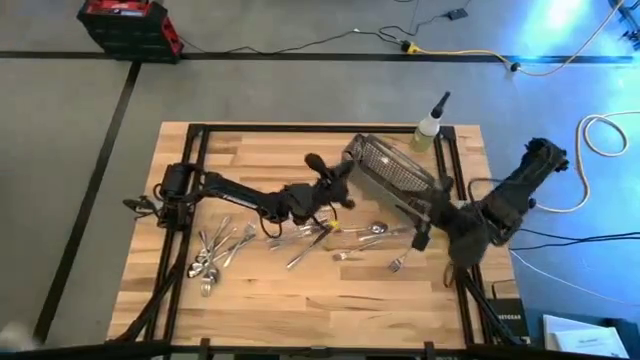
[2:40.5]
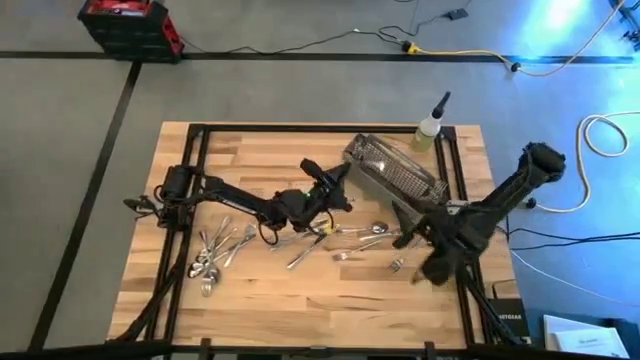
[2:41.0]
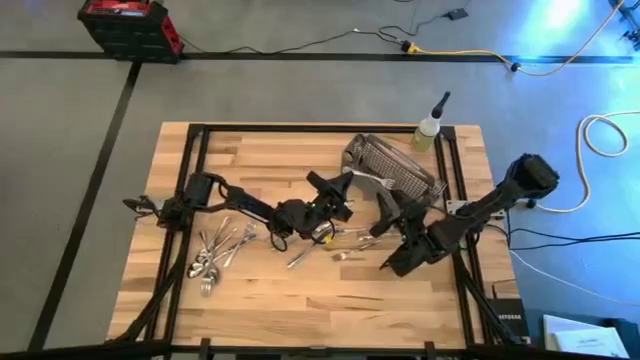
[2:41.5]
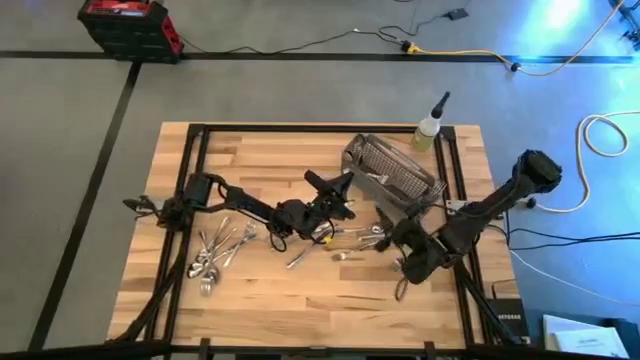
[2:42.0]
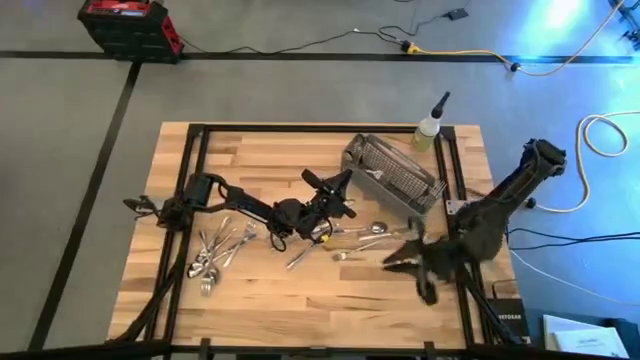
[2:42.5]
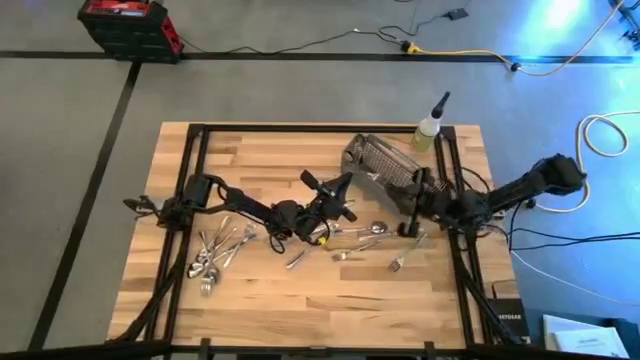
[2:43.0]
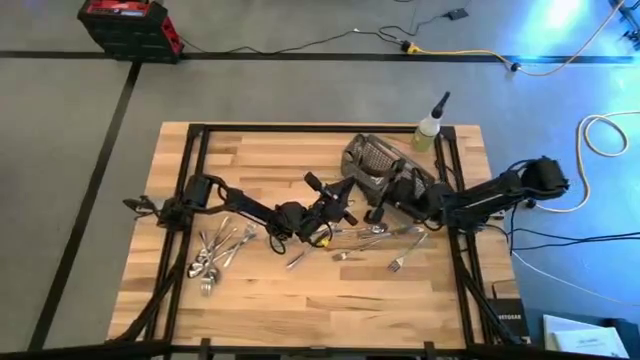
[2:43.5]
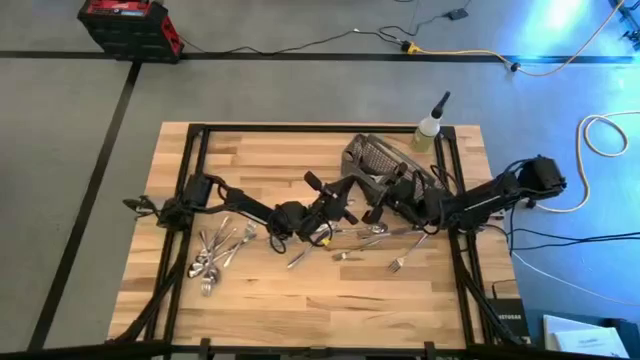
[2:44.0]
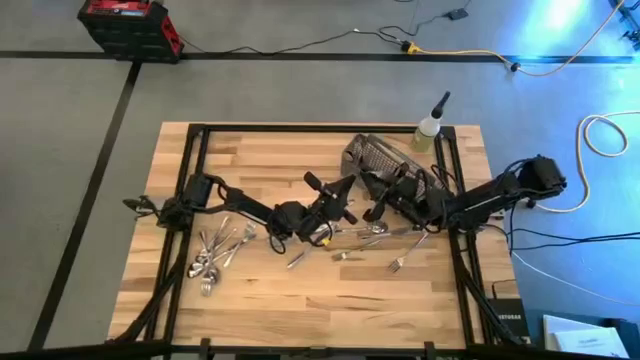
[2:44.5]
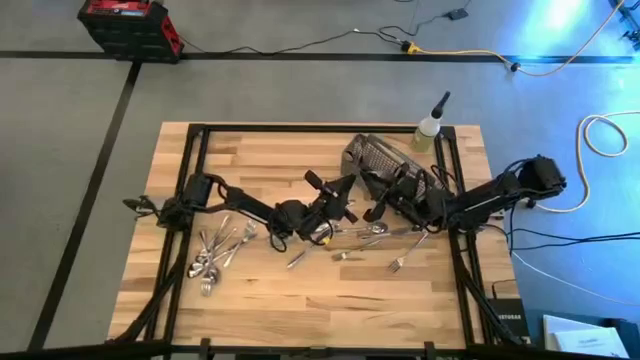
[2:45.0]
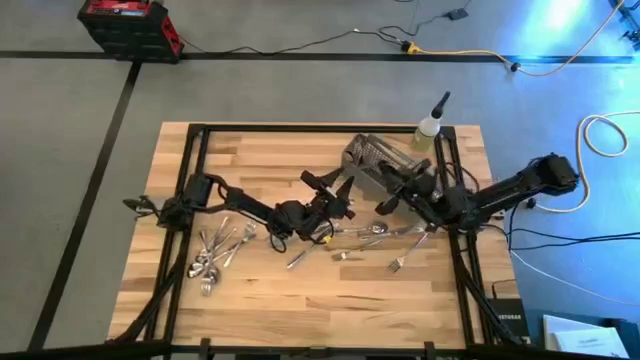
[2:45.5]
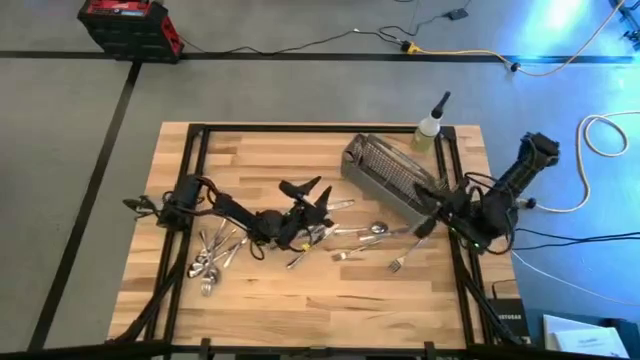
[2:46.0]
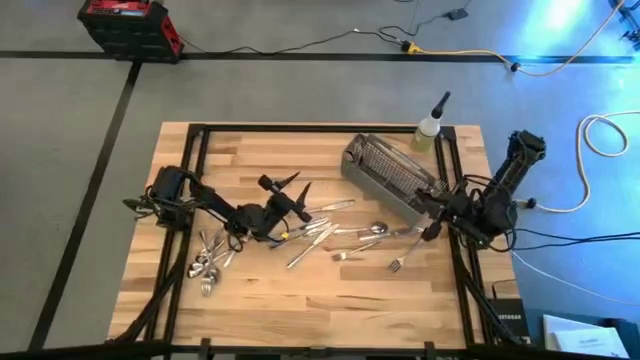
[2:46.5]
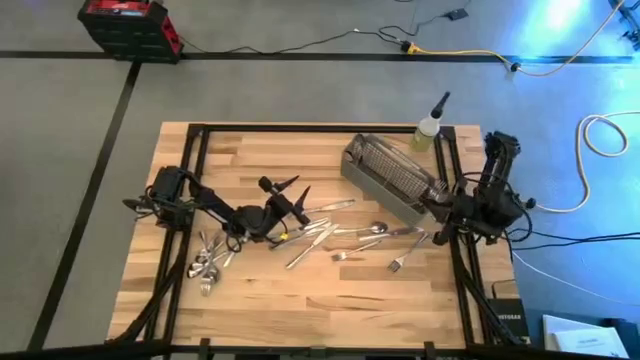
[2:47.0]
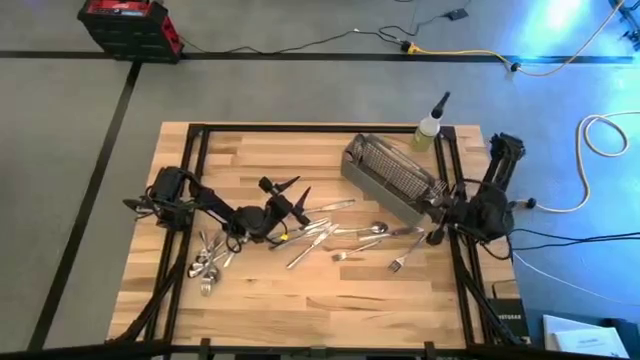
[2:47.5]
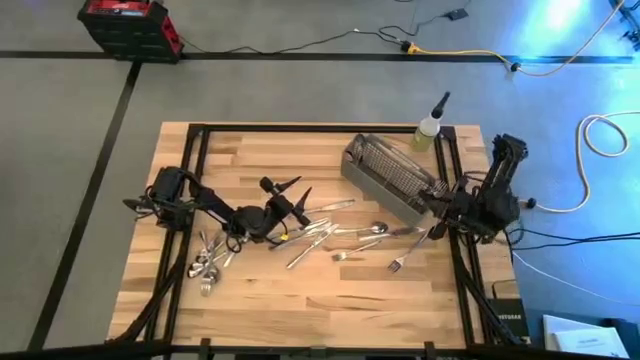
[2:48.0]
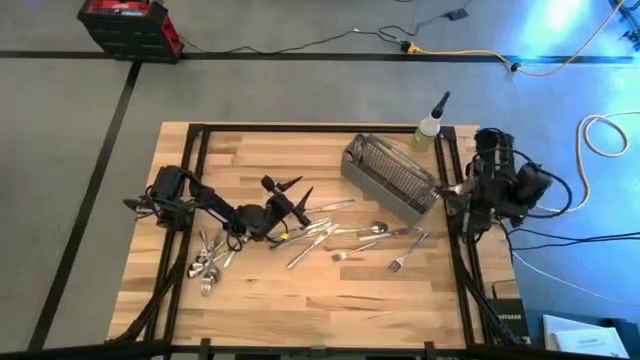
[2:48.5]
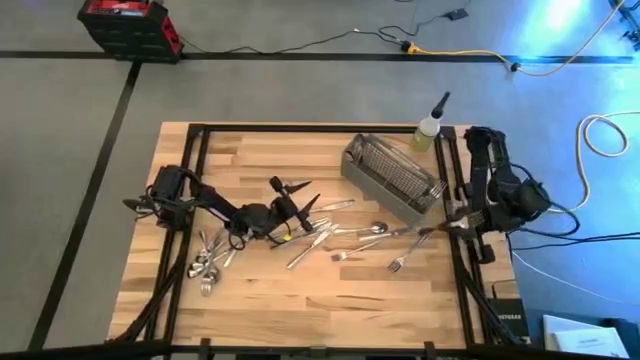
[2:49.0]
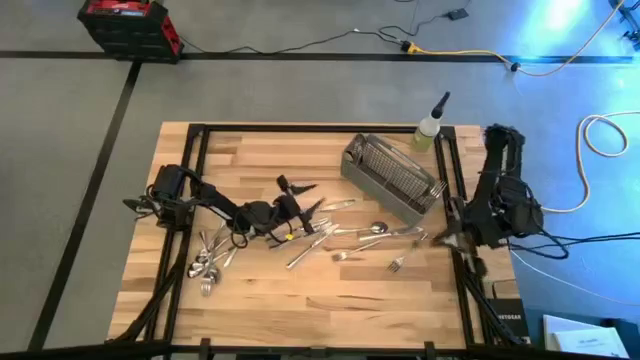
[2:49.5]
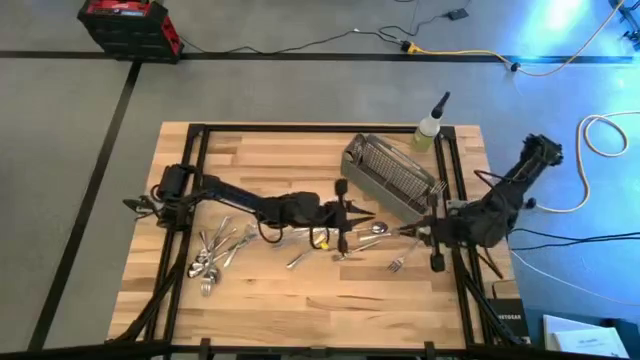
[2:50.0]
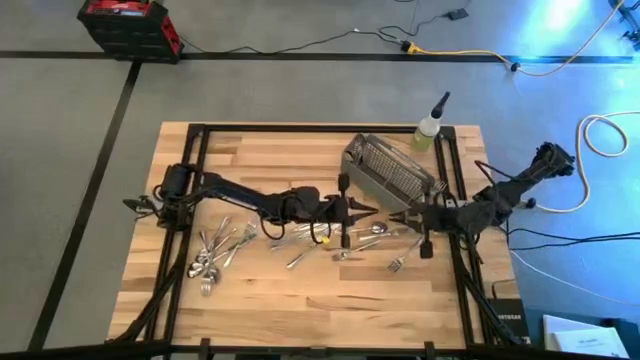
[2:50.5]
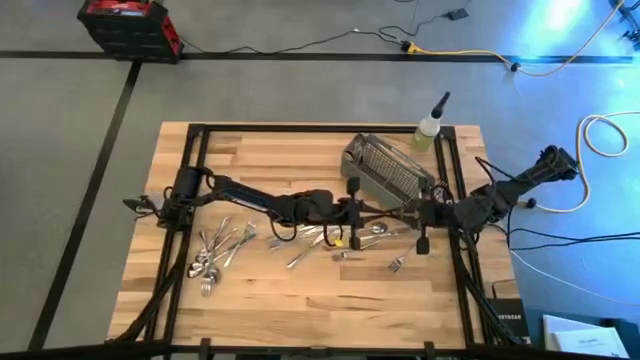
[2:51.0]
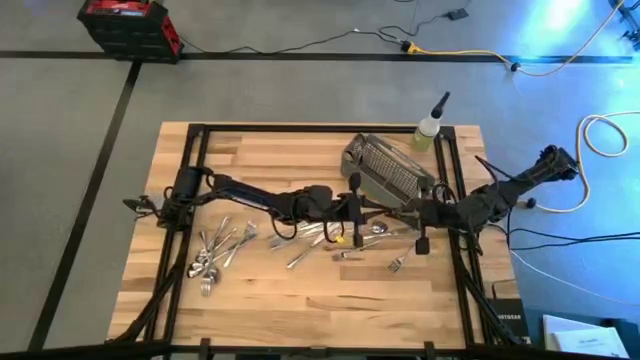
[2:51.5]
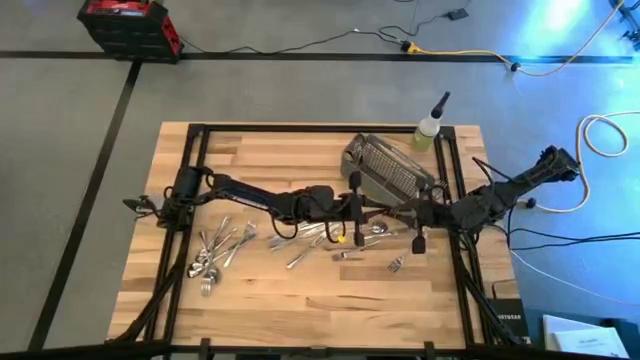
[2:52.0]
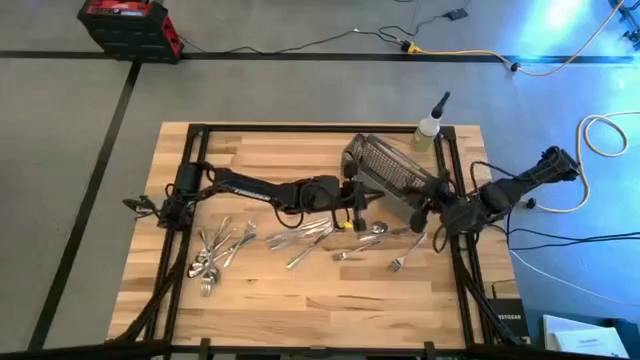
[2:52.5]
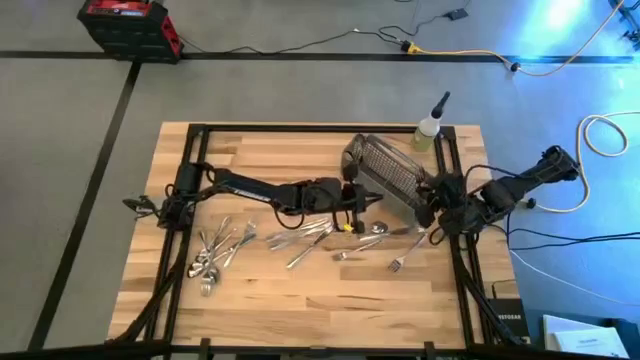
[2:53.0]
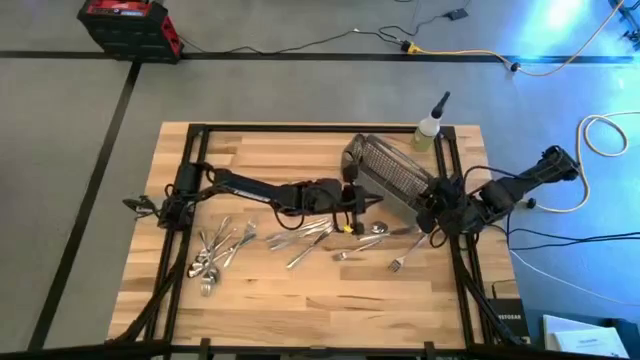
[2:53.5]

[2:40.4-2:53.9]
Task: Sort silverware
Put the silver fork into the gray silverware organizer

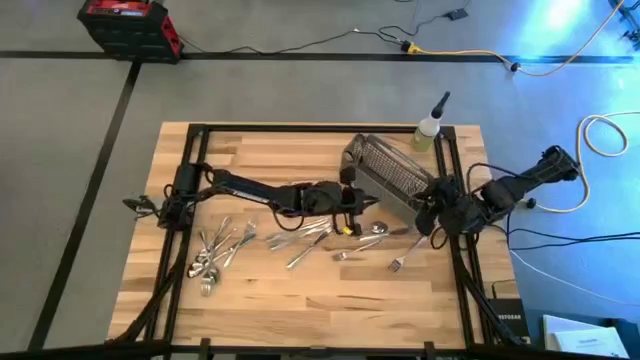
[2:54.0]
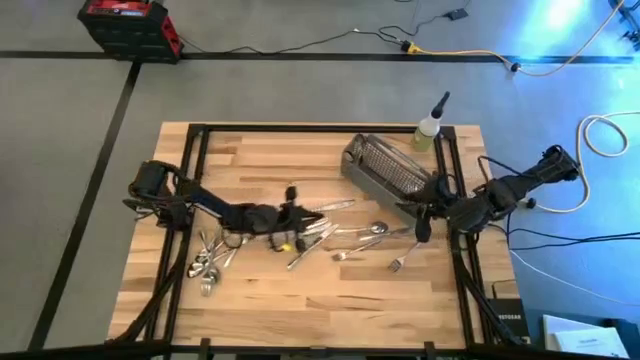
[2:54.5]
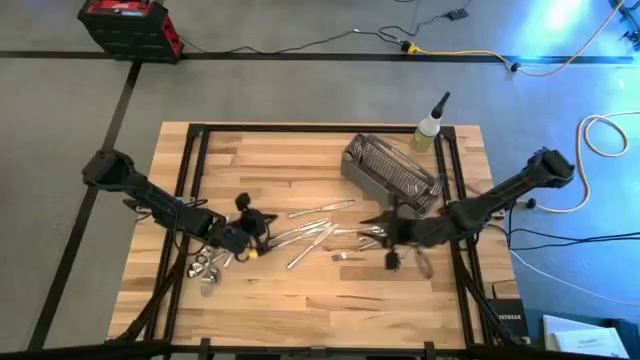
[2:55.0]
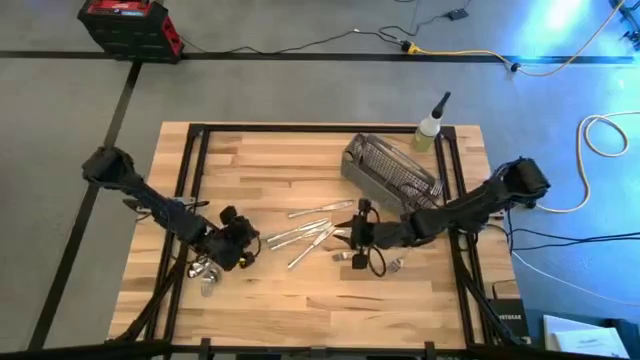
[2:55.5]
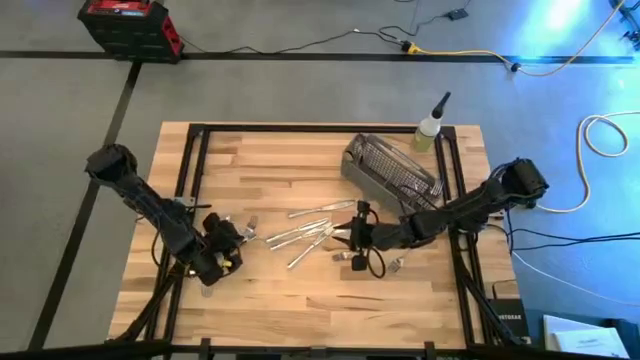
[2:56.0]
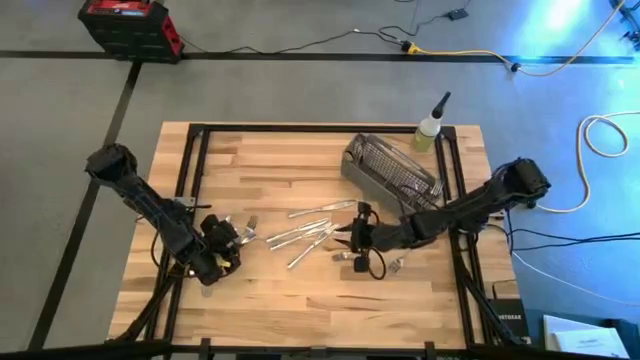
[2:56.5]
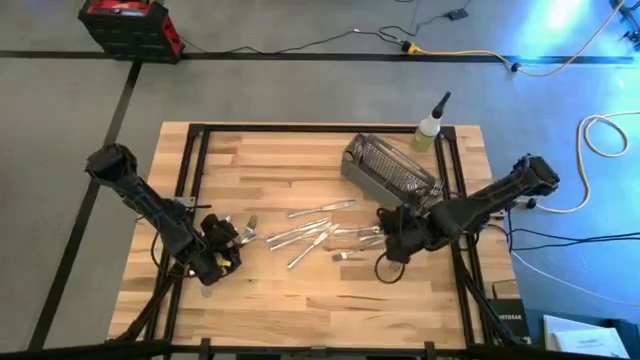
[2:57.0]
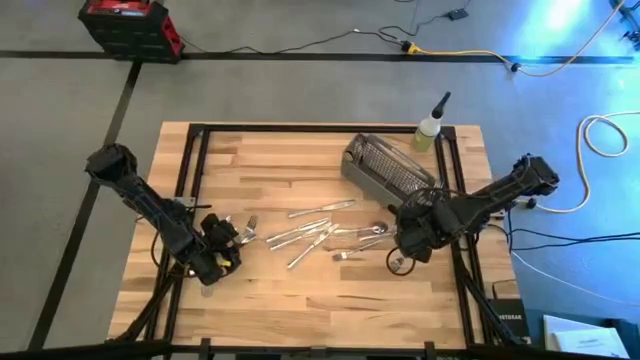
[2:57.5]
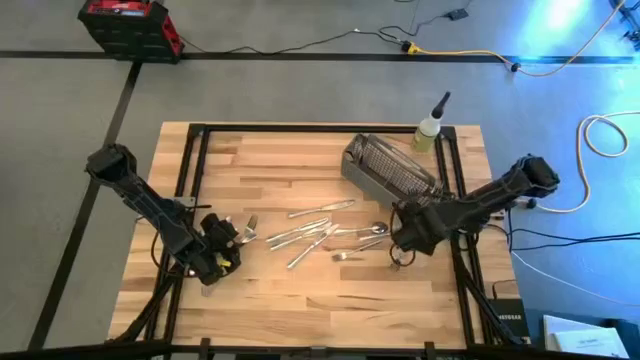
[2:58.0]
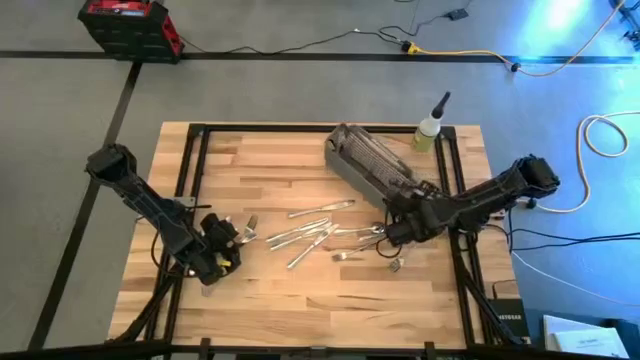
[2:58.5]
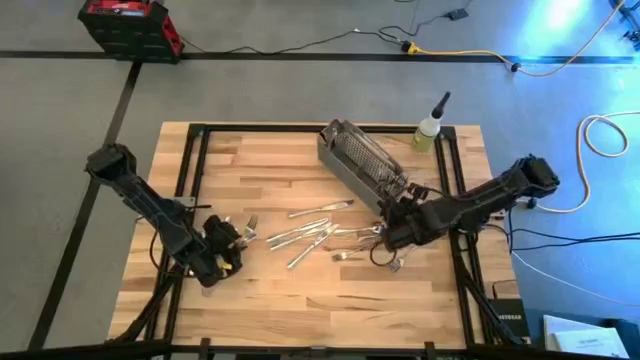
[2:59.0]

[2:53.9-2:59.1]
Adjust the gray silverware organizer

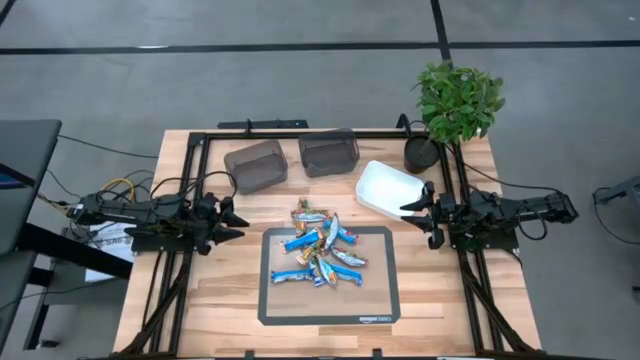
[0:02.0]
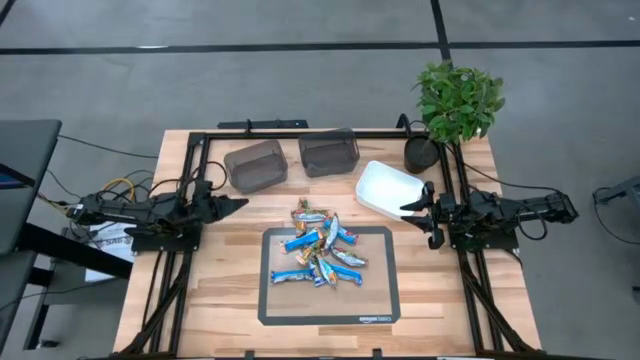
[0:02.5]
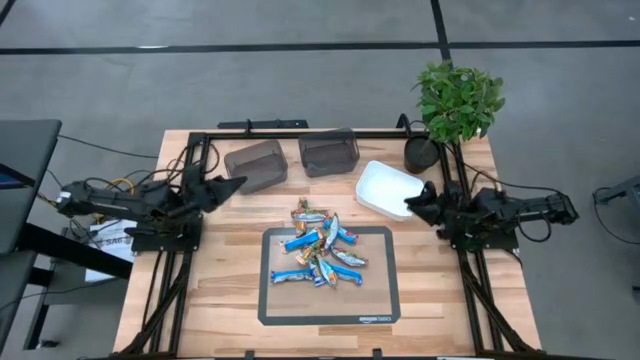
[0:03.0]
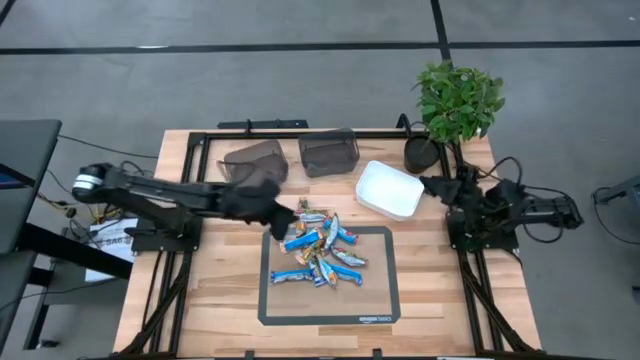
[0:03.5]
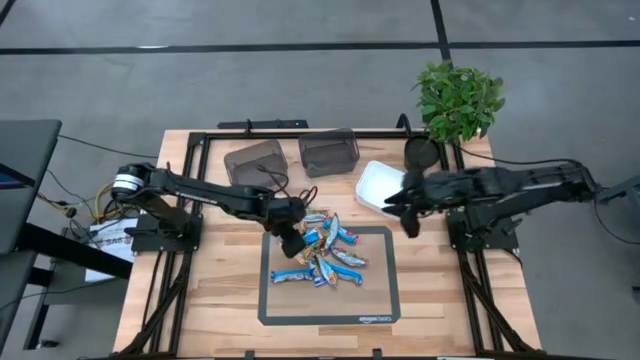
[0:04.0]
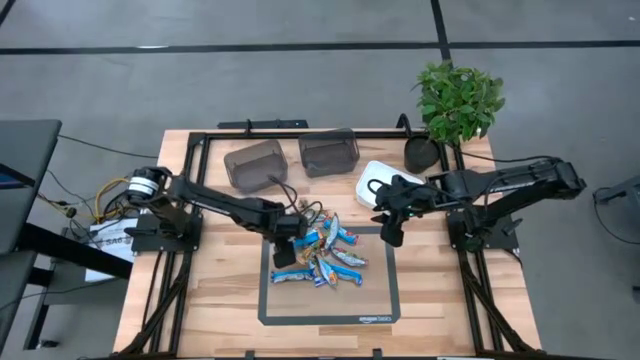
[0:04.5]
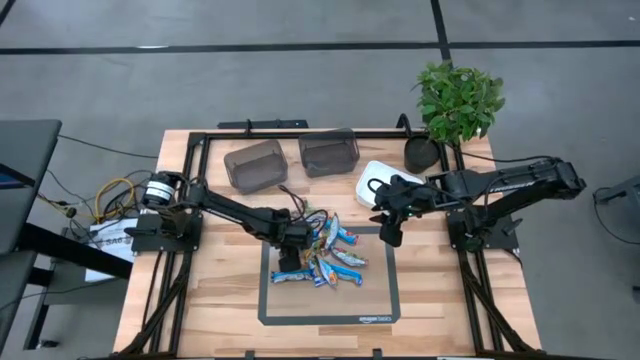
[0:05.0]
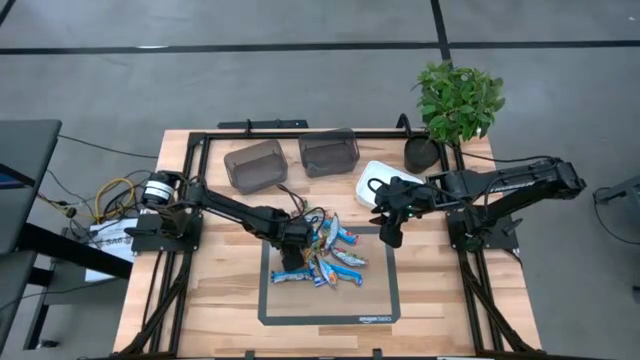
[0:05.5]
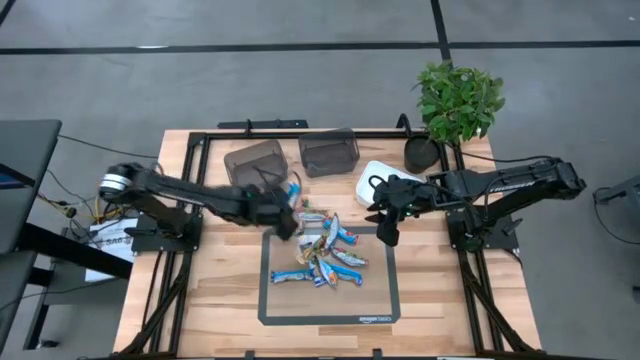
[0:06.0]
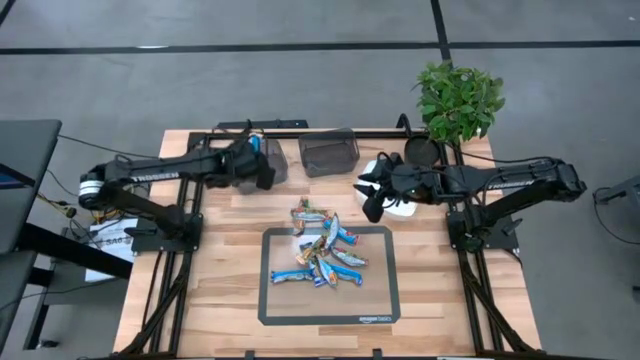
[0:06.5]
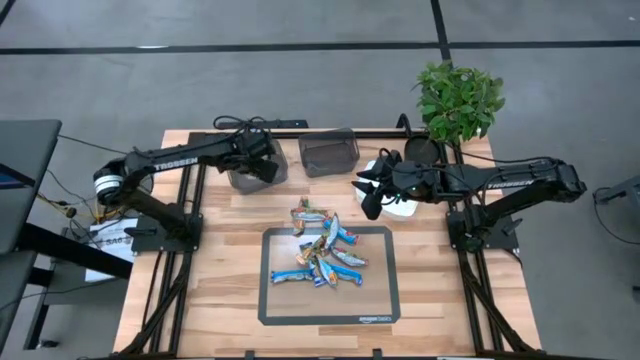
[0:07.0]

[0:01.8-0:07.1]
Task: Pick and place Granola Bars by type
Put the yellow granola bar into the left black bin
